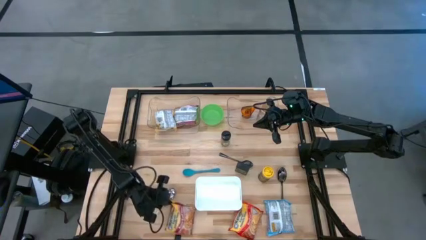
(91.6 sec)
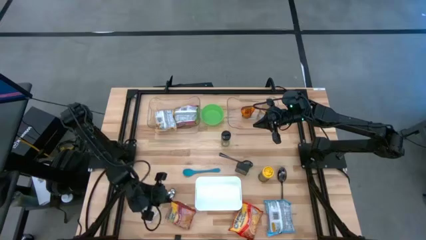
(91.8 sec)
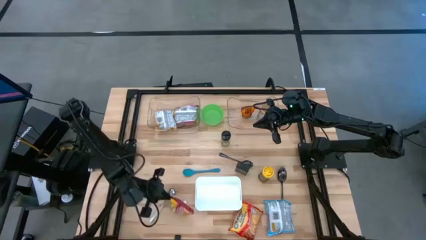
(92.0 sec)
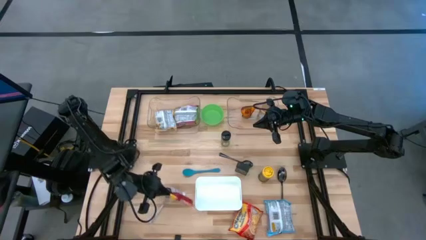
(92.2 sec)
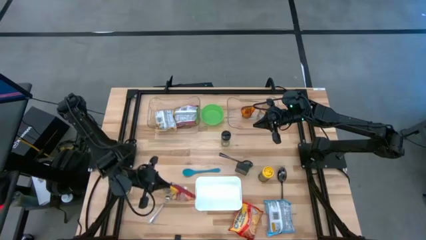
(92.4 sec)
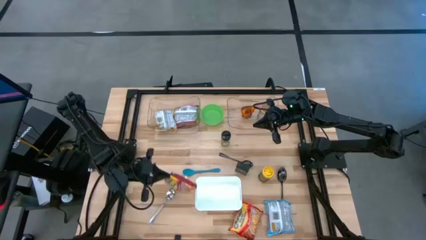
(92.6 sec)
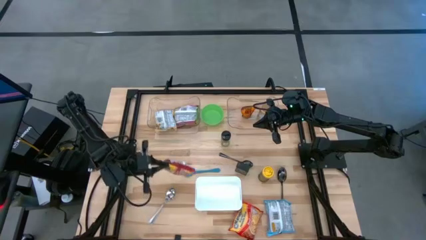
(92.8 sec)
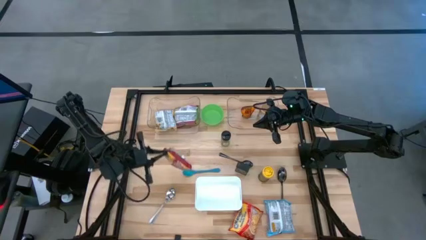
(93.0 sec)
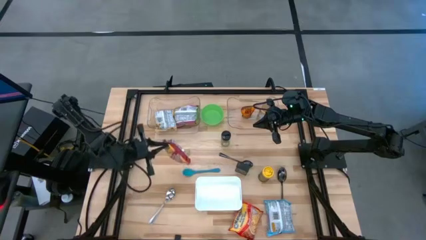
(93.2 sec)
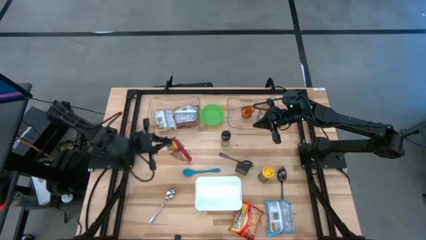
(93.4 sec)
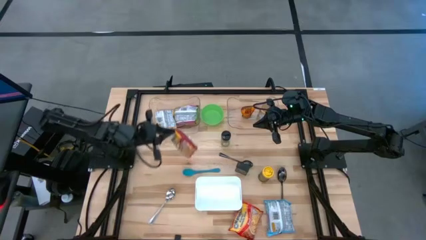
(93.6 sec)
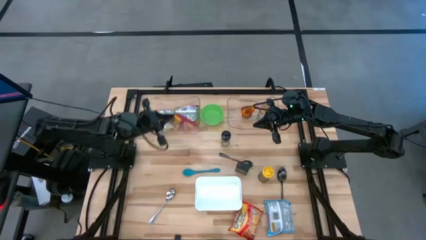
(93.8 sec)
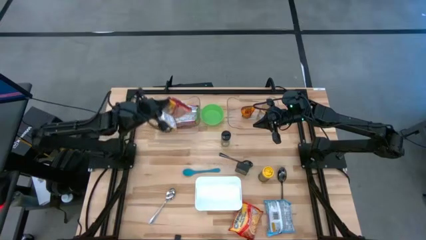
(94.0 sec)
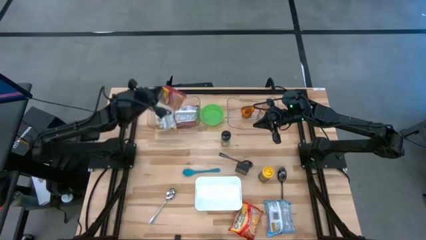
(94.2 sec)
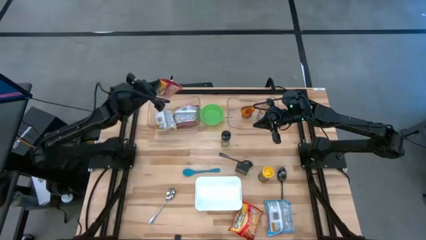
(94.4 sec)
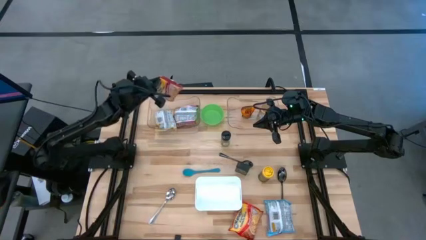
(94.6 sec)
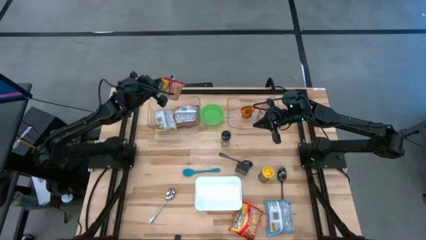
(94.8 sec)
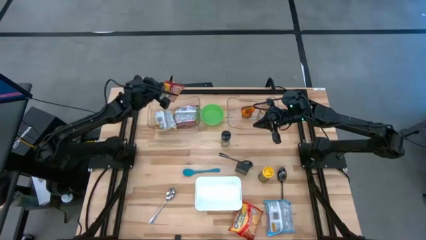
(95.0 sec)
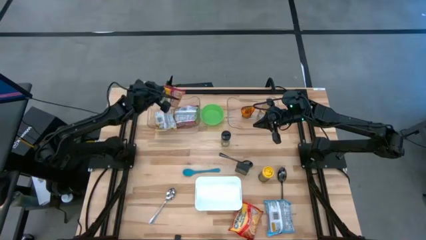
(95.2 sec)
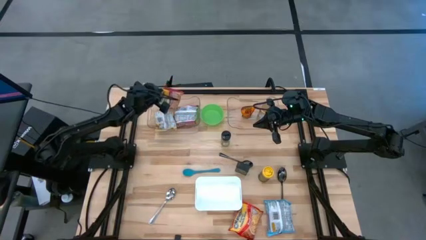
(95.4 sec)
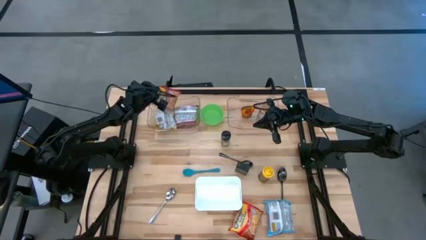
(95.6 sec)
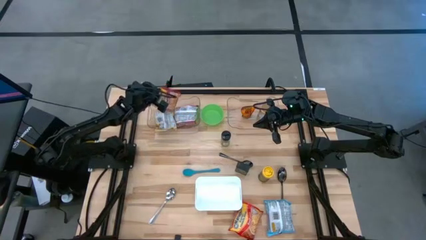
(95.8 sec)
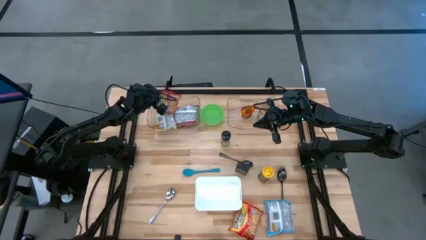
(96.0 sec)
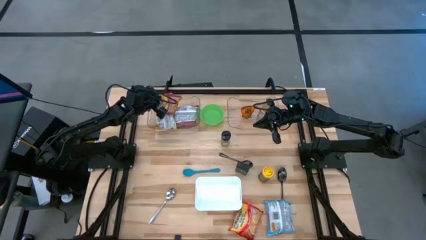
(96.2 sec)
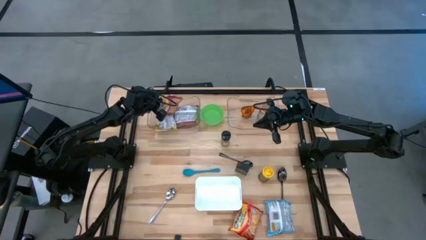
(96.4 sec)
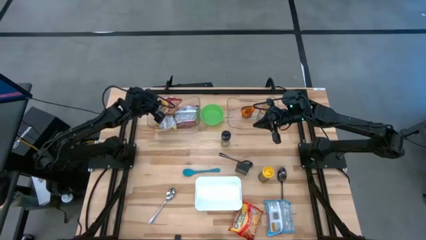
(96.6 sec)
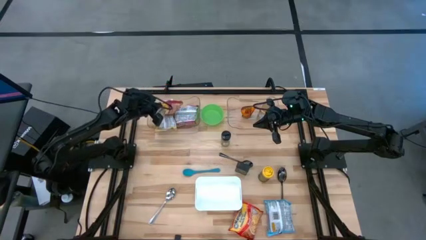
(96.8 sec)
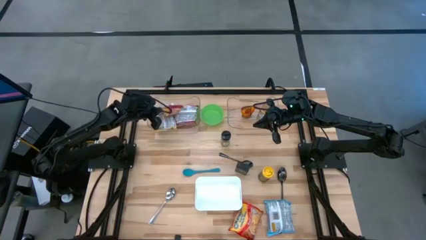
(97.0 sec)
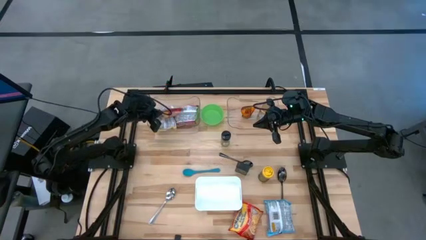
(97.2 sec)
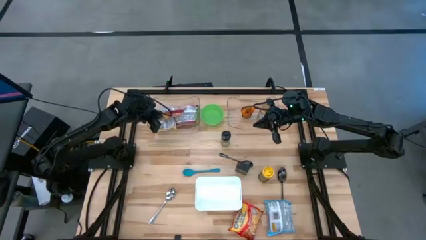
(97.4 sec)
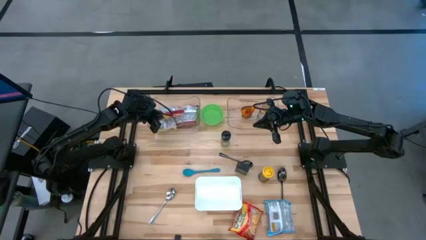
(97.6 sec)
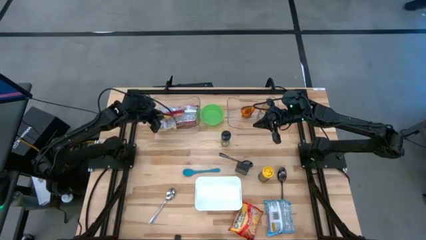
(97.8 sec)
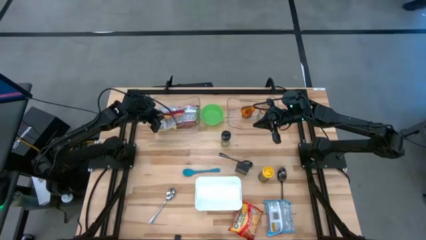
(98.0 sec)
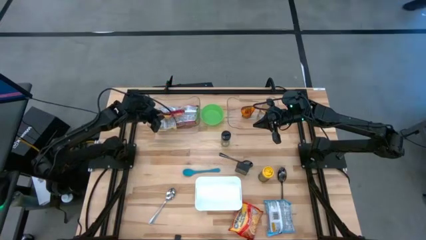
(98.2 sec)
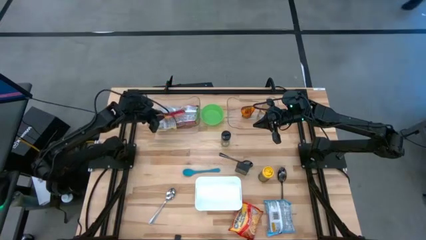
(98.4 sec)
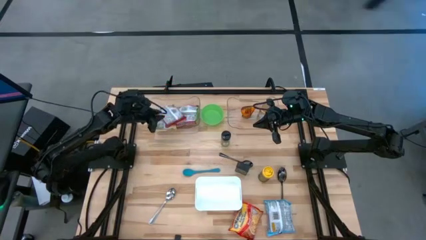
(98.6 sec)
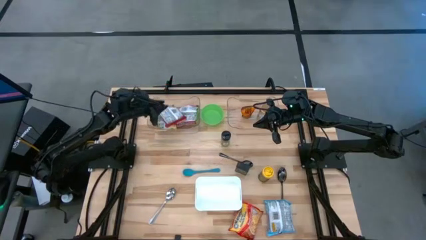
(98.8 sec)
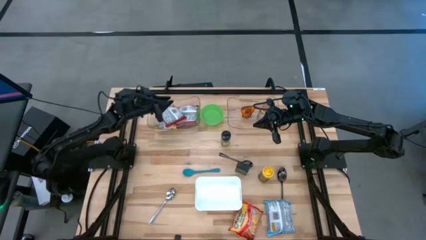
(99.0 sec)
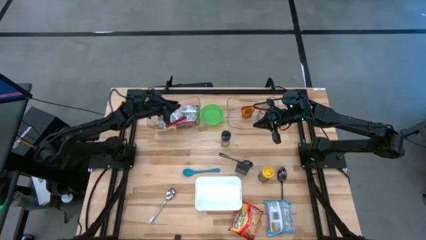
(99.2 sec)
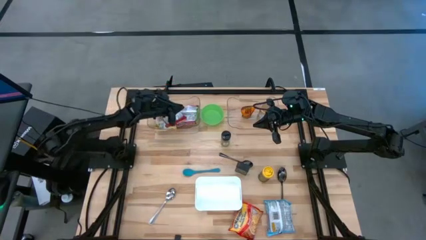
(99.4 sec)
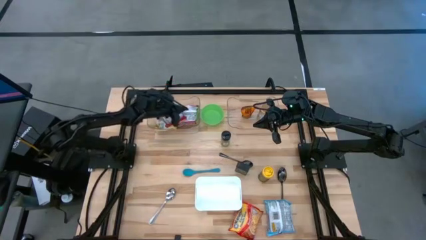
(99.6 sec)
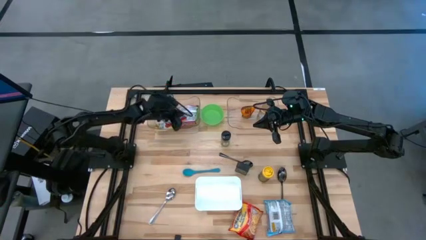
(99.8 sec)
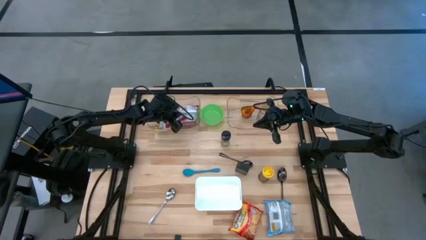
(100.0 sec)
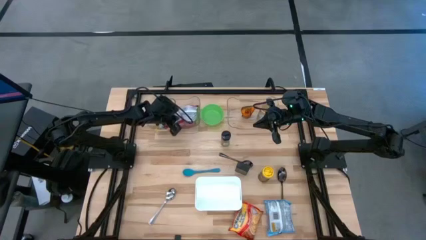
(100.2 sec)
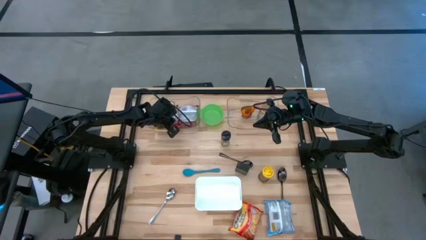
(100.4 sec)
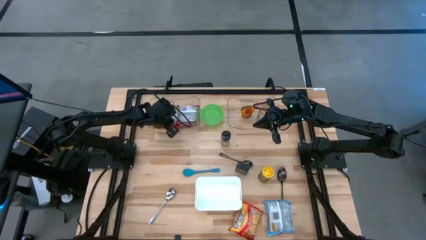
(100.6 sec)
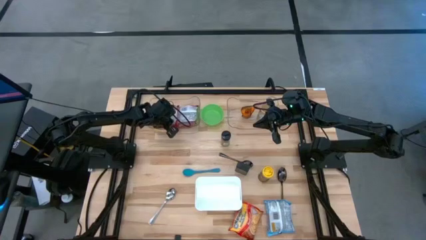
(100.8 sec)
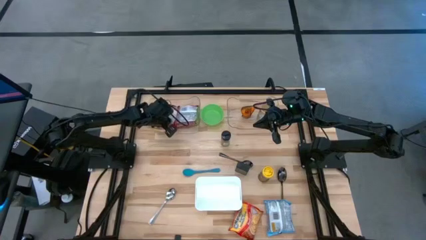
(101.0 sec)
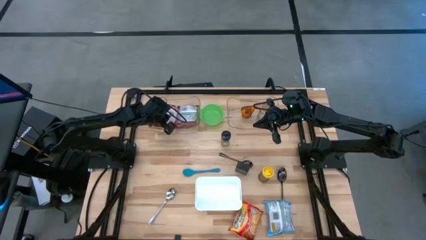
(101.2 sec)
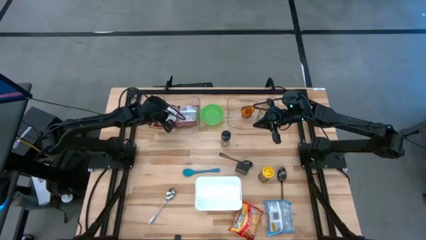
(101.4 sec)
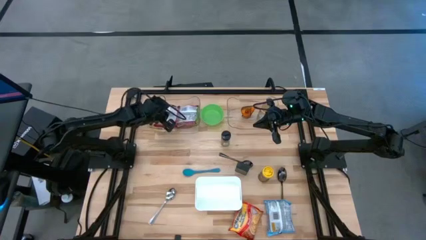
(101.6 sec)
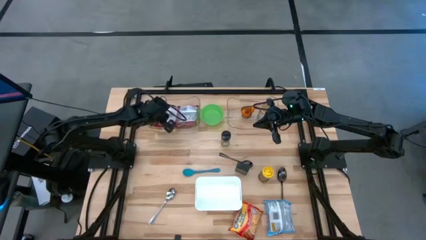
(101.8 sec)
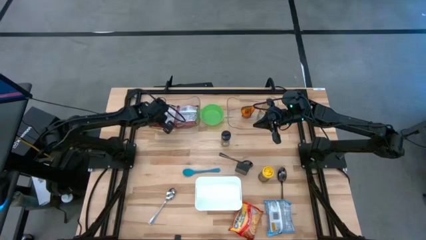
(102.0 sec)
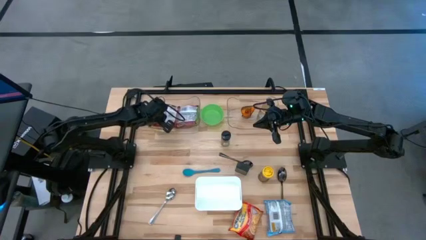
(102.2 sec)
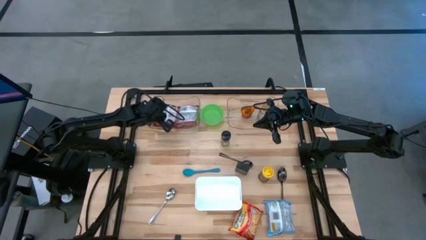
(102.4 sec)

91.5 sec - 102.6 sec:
Task: Pick & Place Food Item
Put the red noodle pack into the left transparent bin
